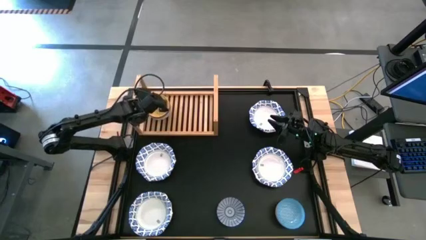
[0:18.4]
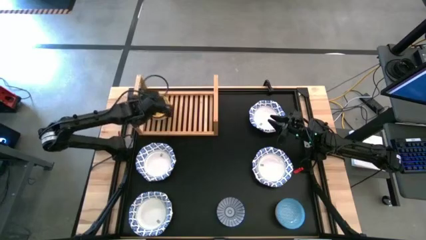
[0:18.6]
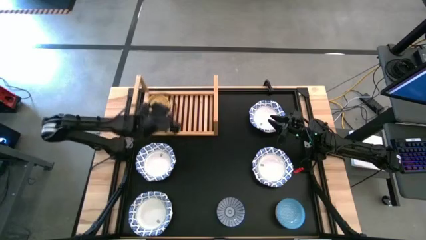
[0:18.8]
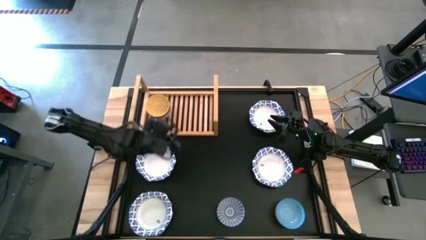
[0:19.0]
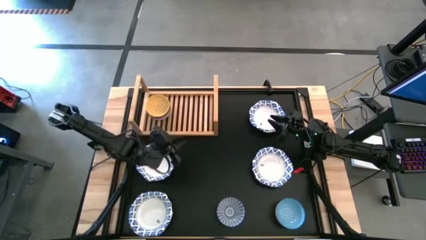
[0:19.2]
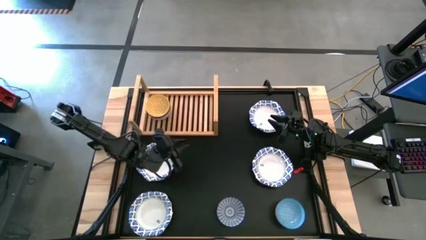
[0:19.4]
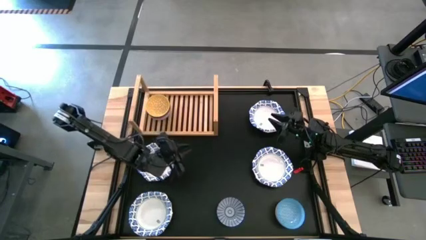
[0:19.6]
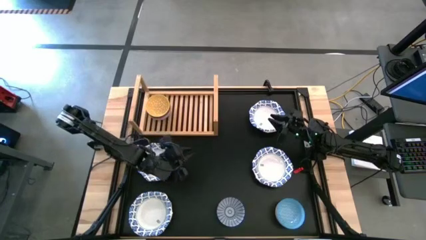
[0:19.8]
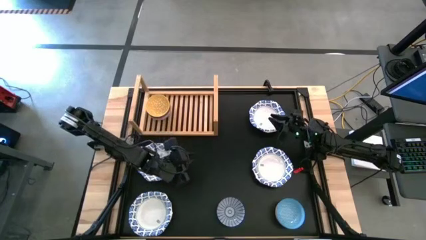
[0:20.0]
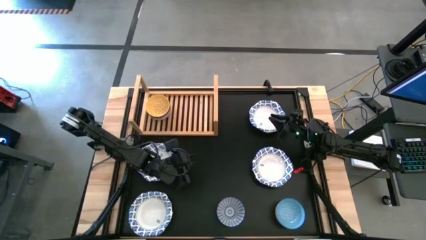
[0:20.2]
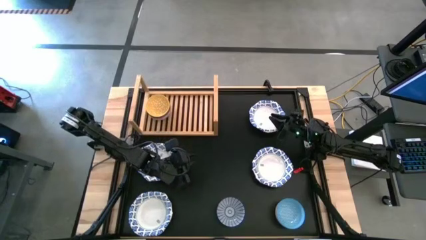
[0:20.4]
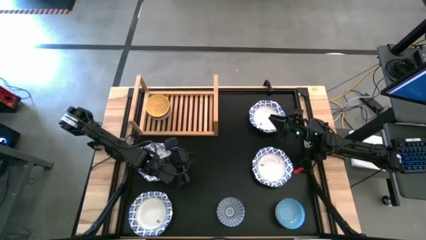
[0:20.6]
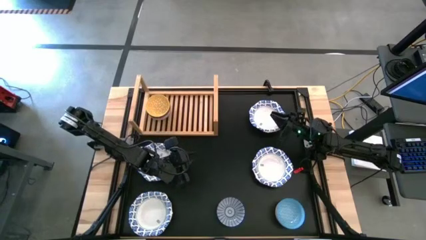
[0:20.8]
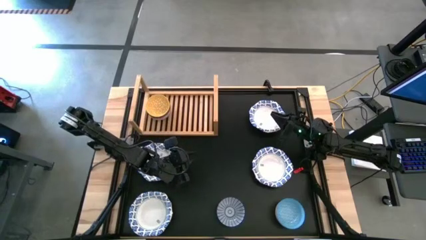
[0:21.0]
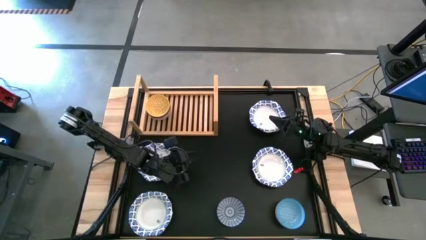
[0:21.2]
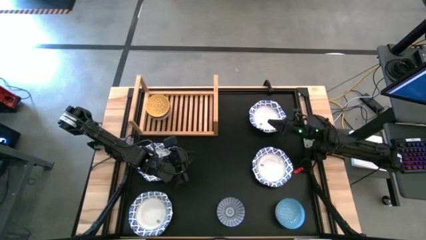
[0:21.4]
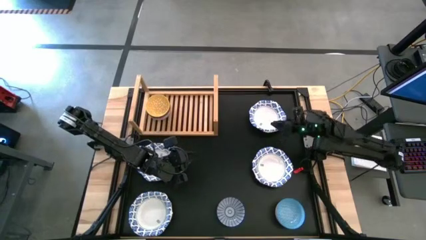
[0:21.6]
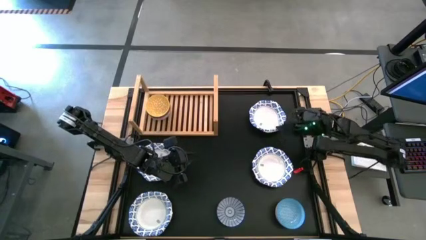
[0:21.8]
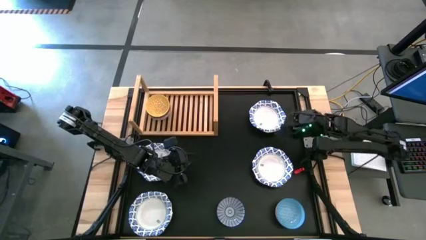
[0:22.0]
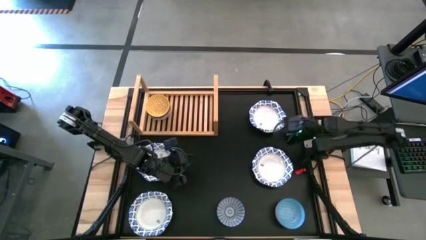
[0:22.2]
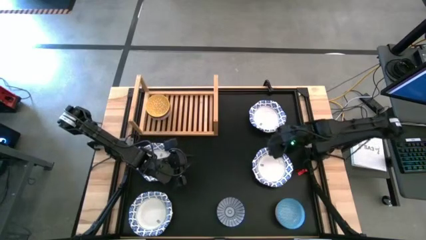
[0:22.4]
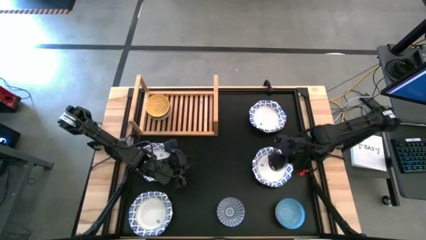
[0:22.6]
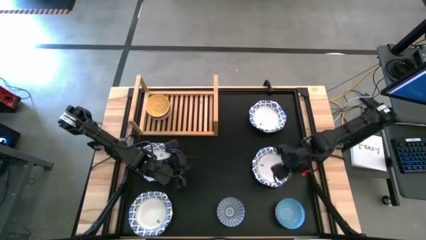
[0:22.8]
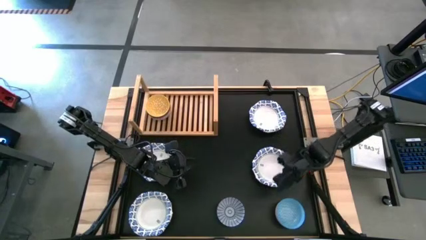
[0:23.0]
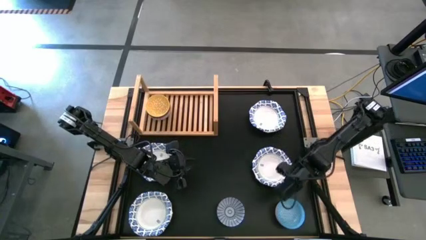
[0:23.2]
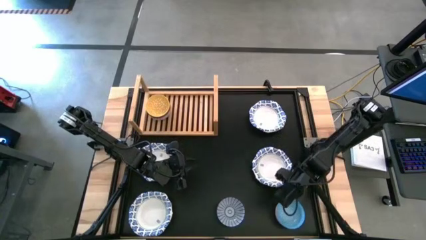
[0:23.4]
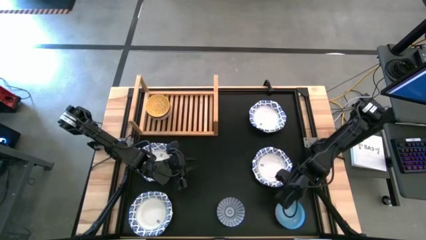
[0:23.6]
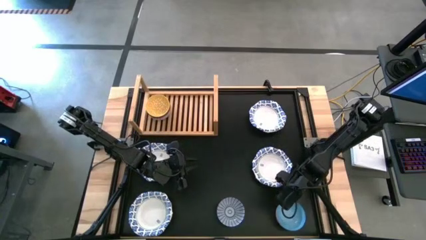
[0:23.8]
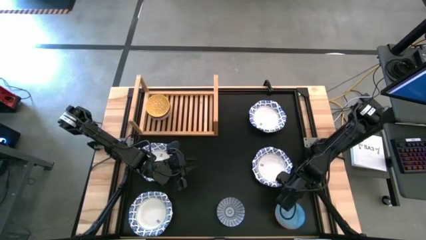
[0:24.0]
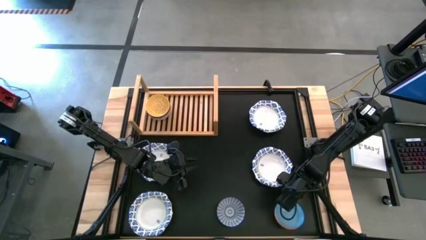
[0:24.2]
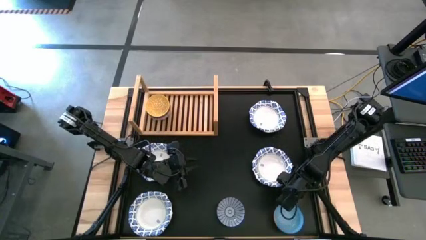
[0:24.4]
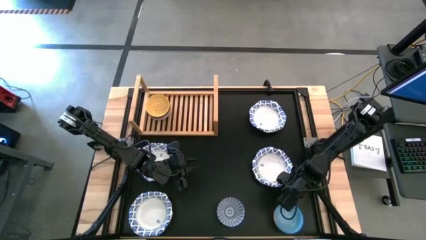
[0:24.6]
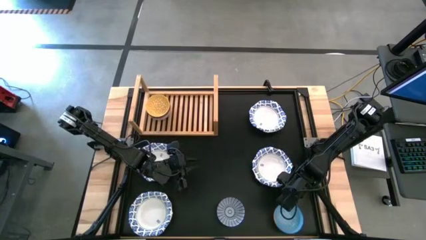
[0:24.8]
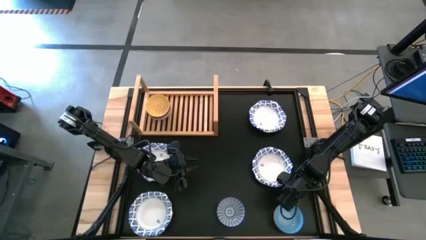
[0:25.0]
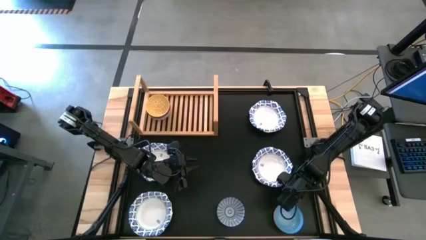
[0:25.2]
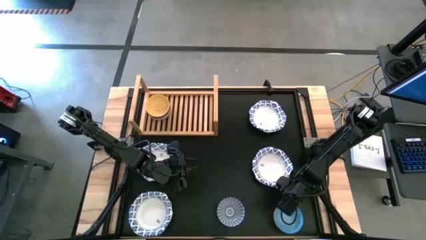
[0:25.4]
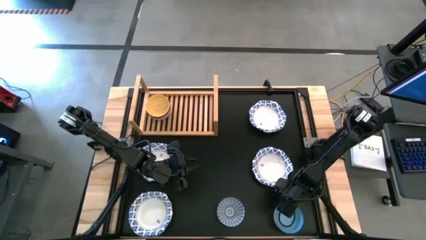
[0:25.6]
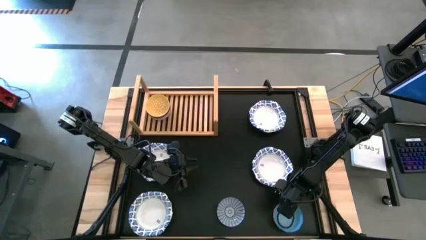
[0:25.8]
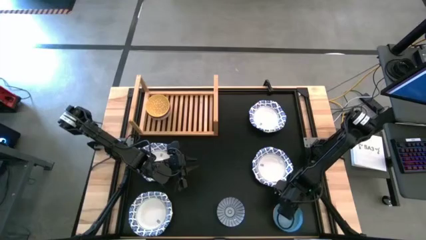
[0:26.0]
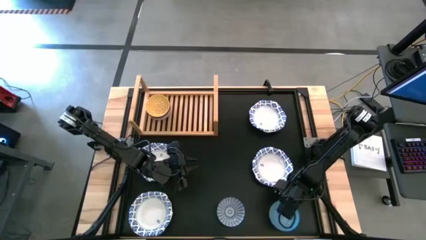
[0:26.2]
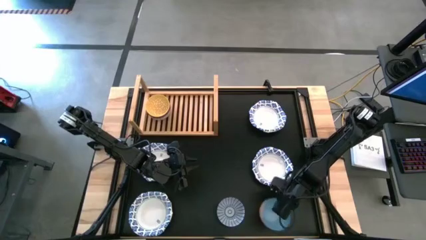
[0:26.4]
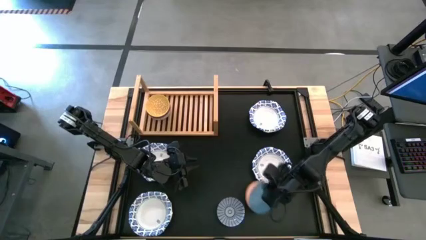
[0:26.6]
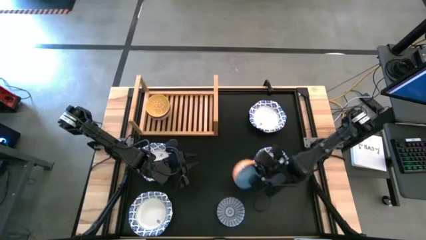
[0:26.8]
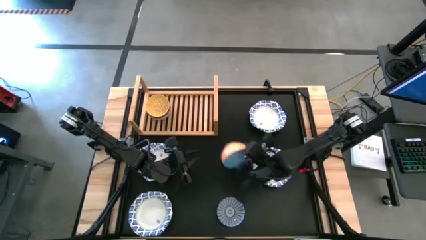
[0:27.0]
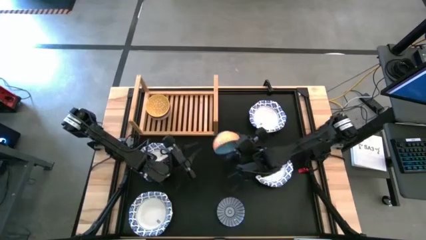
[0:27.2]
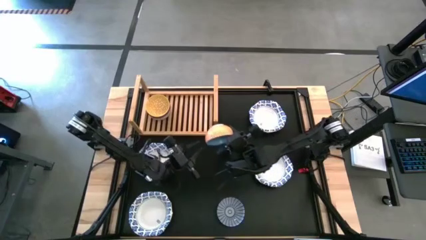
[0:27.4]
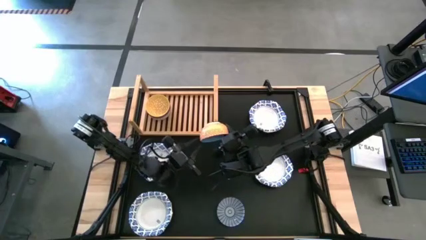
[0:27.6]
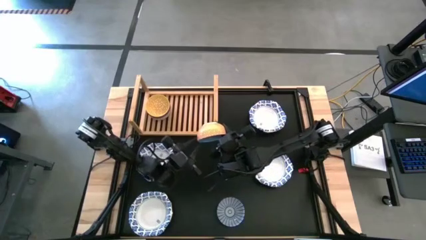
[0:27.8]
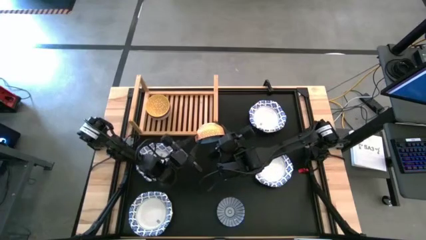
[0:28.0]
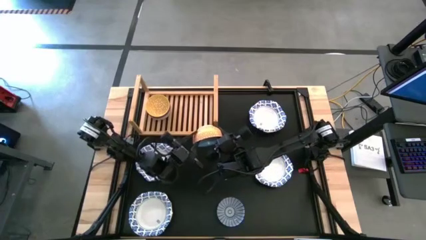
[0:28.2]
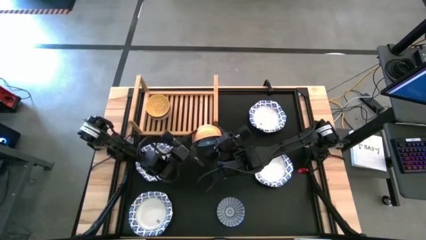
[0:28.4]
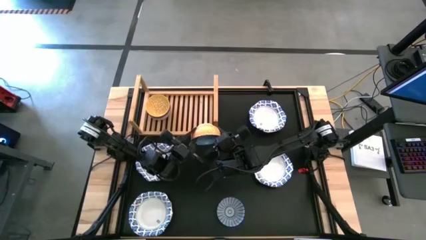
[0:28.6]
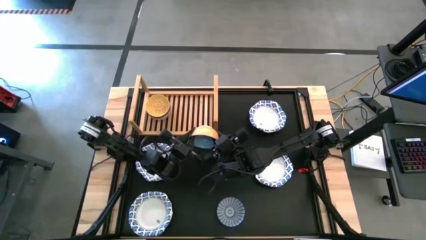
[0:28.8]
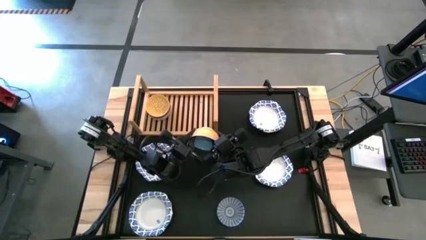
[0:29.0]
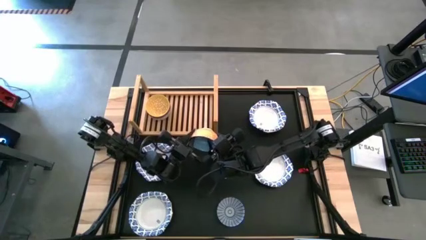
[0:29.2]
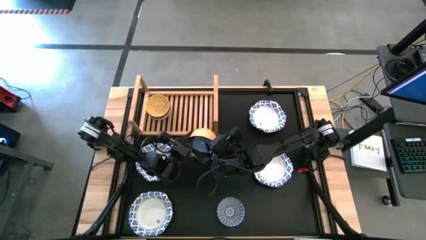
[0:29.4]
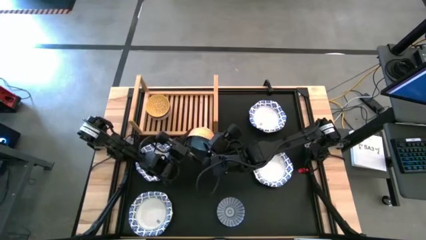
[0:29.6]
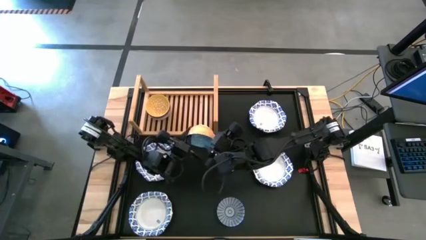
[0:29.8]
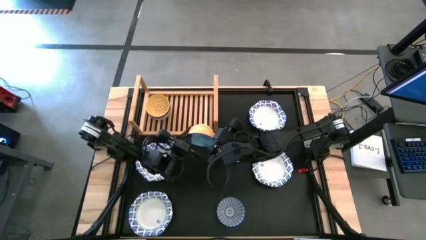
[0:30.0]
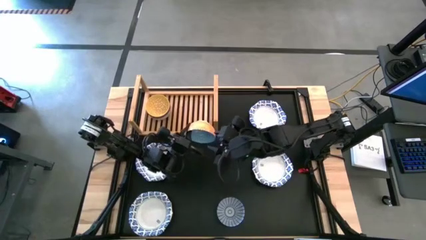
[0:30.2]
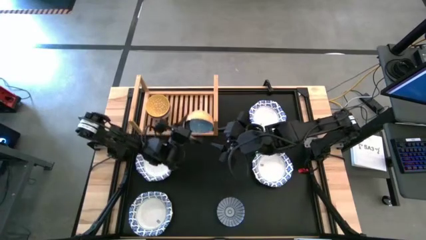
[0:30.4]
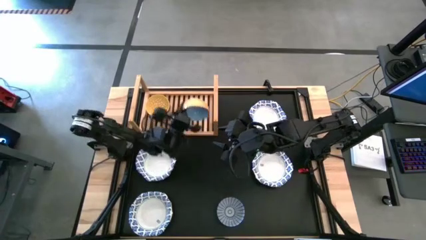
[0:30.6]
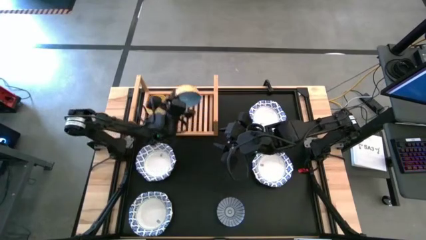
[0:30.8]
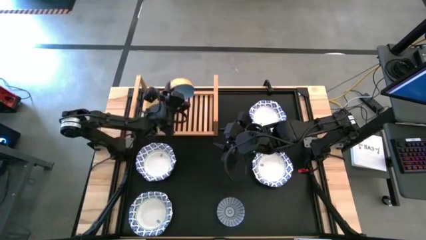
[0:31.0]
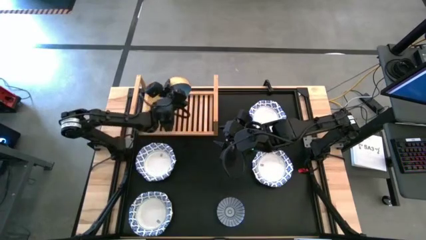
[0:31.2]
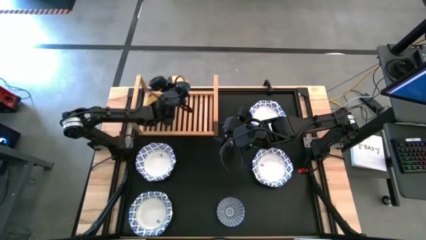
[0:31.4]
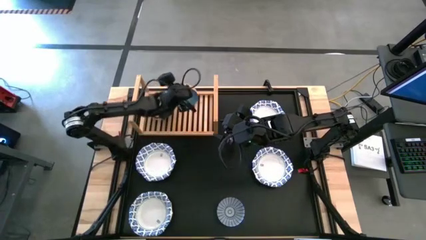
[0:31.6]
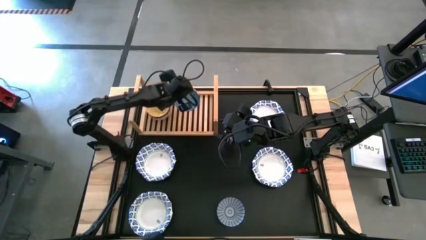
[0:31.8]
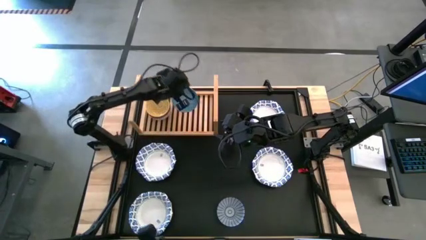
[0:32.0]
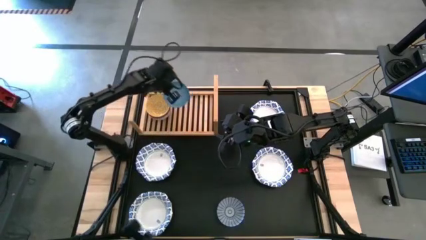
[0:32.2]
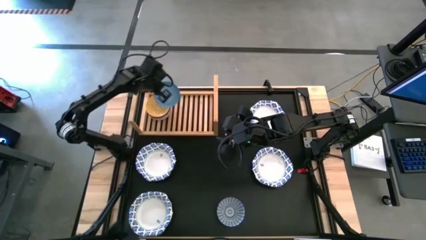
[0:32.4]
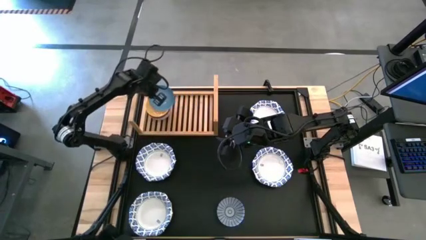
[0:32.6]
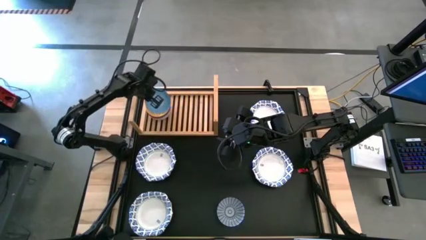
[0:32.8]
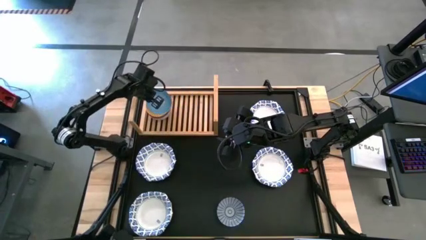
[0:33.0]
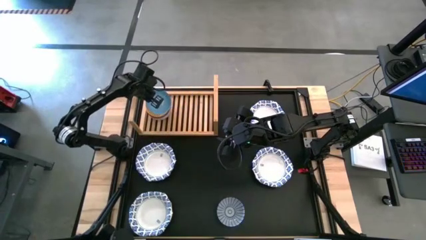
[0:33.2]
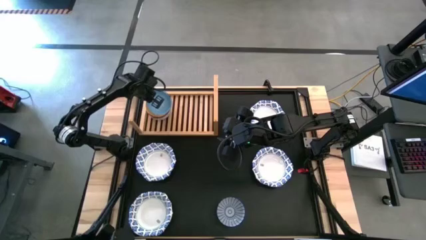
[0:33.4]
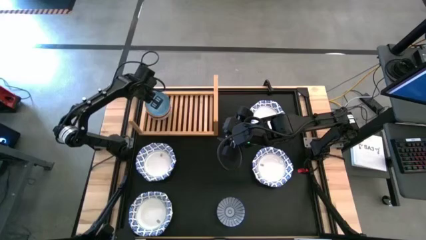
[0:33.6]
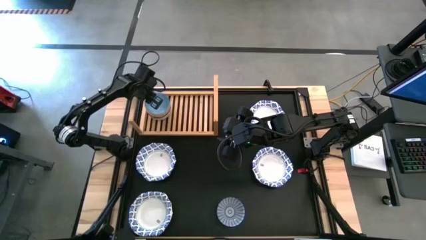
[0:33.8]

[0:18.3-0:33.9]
Task: Place and stack bowls onto a shelf
Stack the patterned light blue bowl on top of the patterned yellow bowl on the shelf
